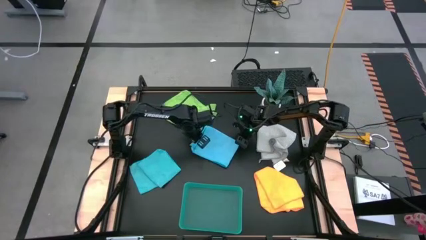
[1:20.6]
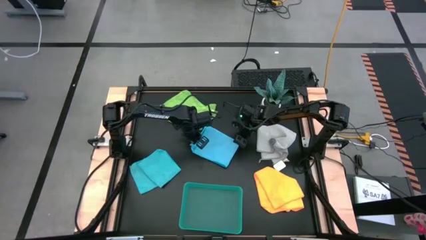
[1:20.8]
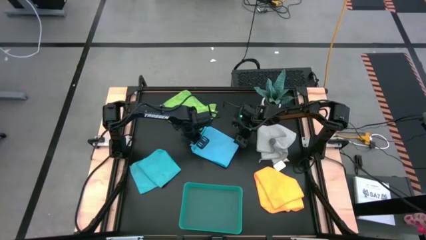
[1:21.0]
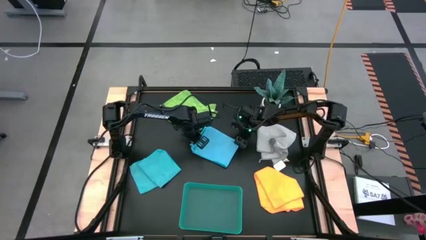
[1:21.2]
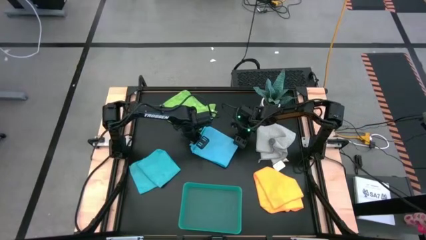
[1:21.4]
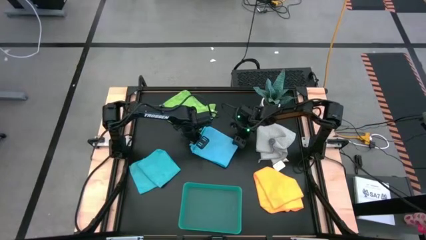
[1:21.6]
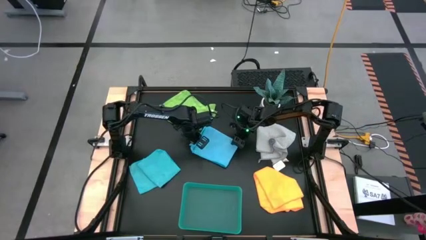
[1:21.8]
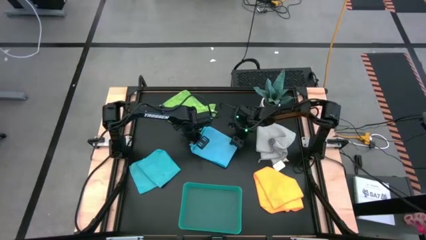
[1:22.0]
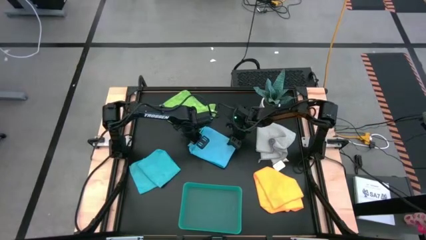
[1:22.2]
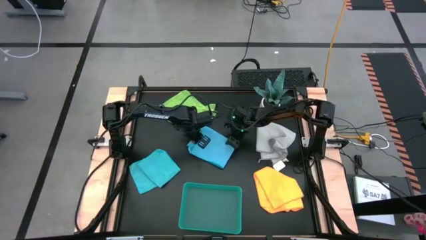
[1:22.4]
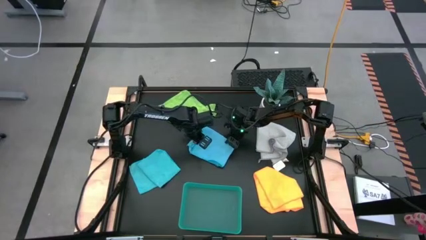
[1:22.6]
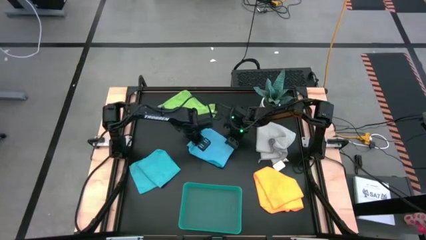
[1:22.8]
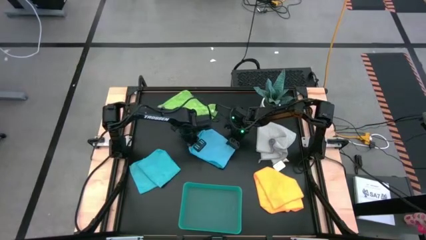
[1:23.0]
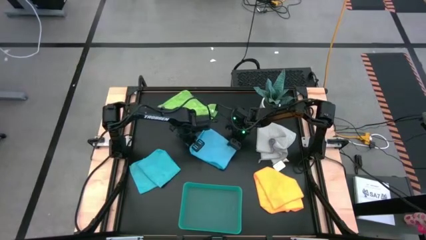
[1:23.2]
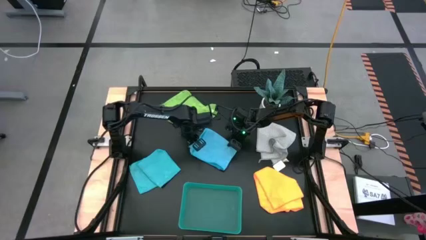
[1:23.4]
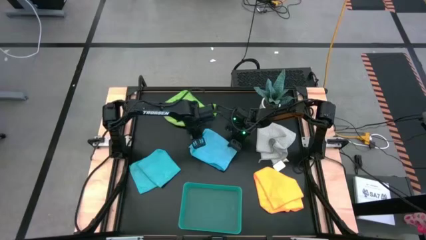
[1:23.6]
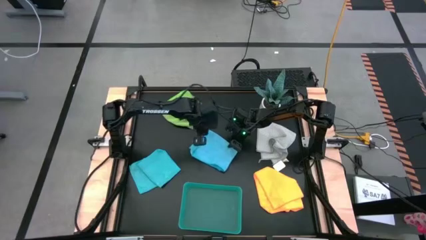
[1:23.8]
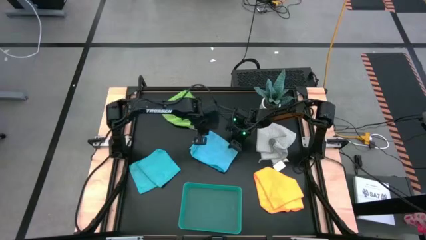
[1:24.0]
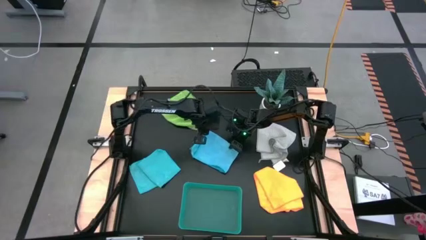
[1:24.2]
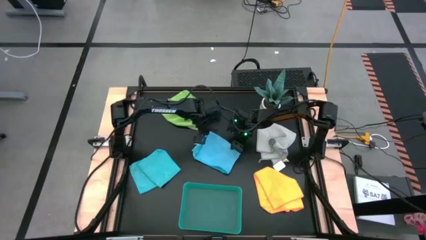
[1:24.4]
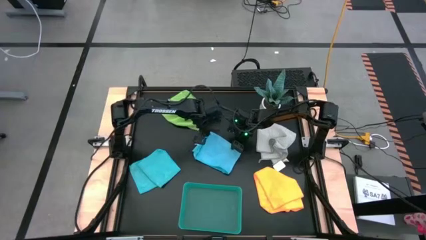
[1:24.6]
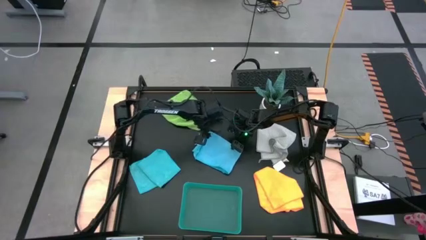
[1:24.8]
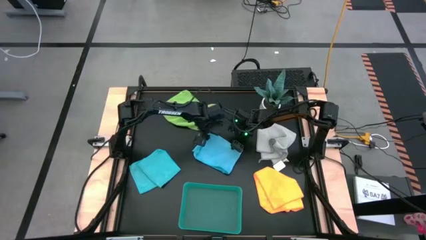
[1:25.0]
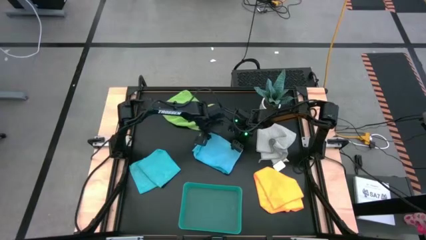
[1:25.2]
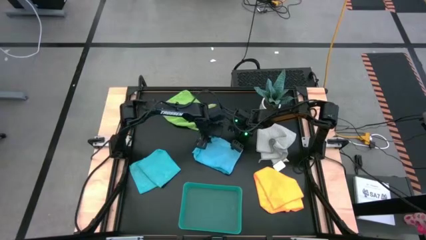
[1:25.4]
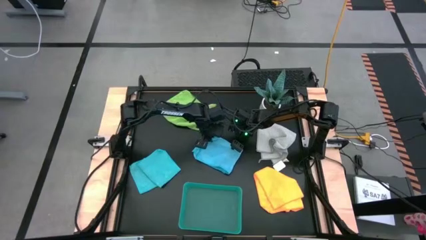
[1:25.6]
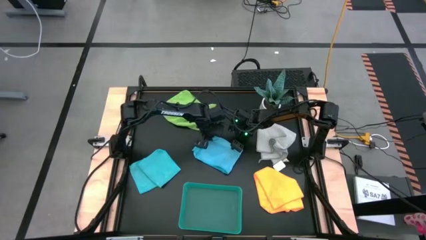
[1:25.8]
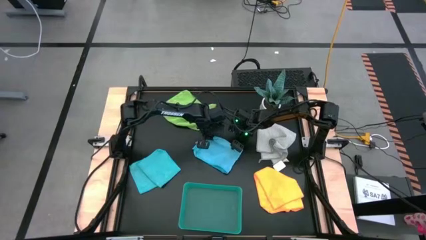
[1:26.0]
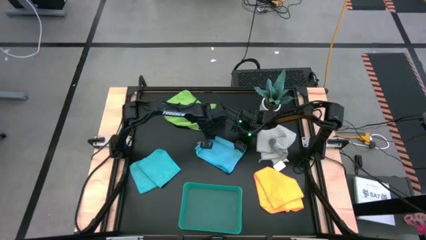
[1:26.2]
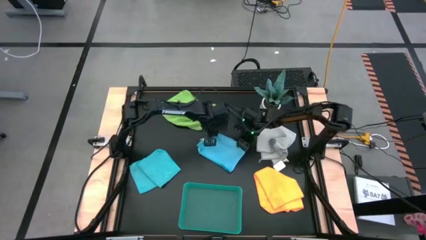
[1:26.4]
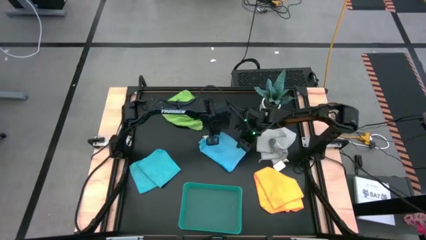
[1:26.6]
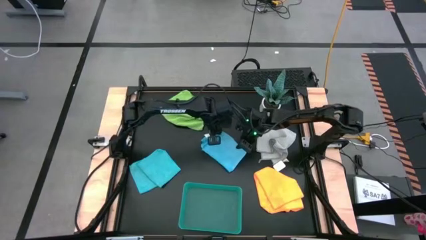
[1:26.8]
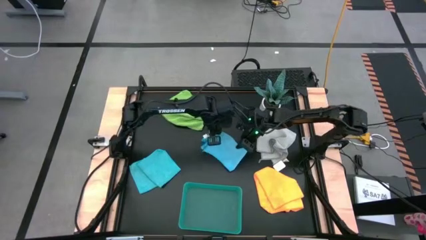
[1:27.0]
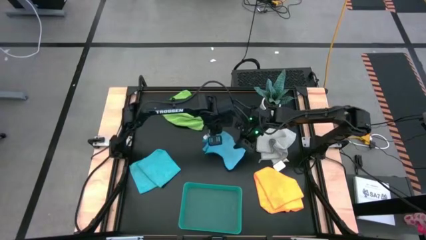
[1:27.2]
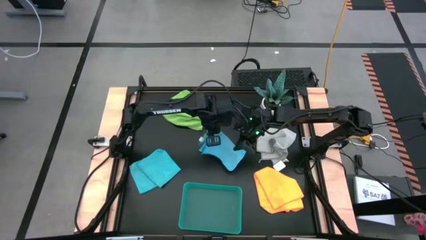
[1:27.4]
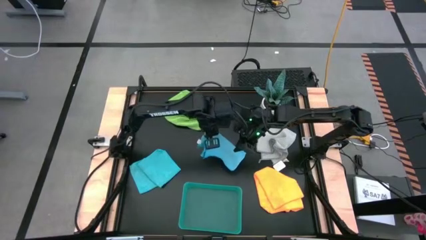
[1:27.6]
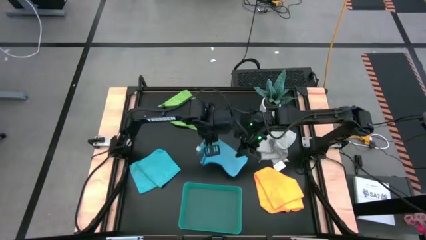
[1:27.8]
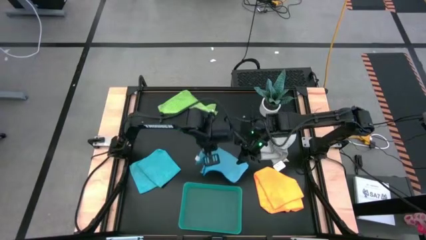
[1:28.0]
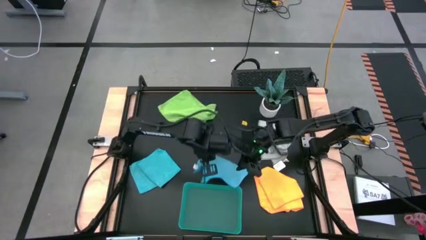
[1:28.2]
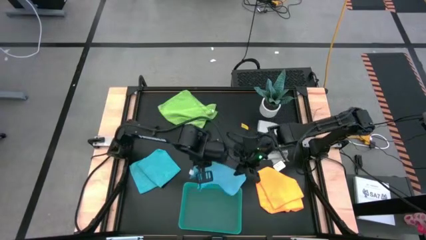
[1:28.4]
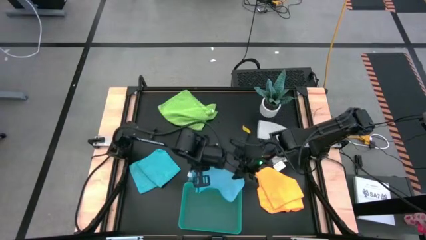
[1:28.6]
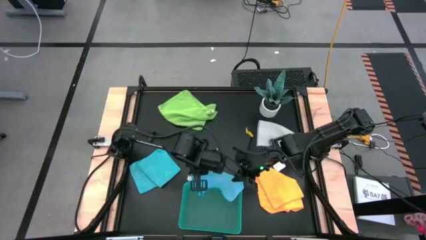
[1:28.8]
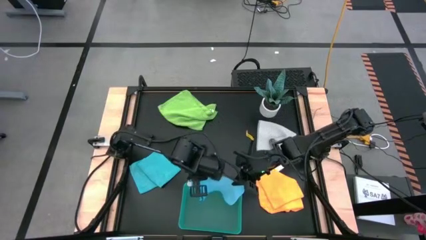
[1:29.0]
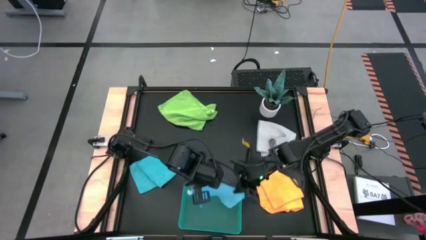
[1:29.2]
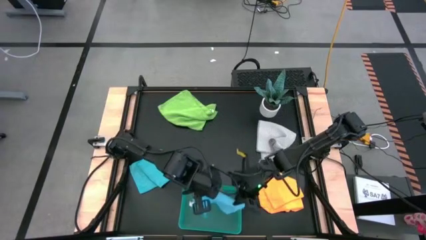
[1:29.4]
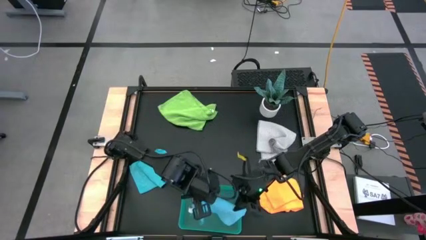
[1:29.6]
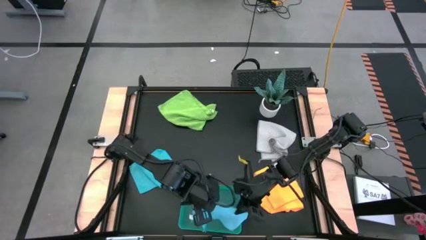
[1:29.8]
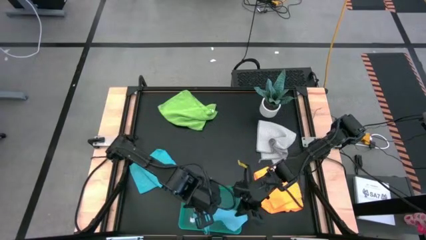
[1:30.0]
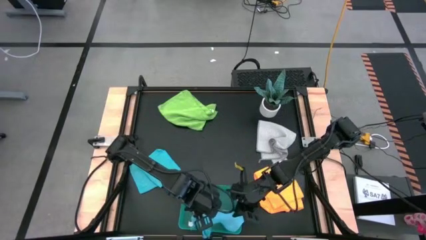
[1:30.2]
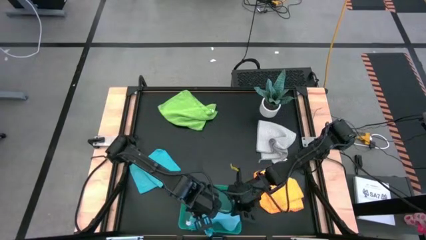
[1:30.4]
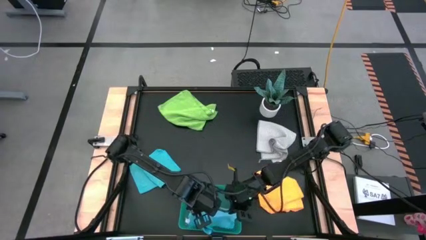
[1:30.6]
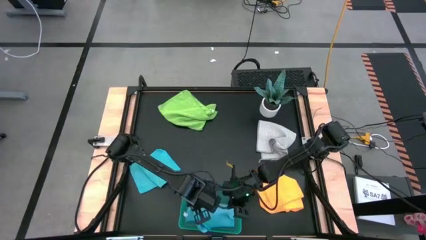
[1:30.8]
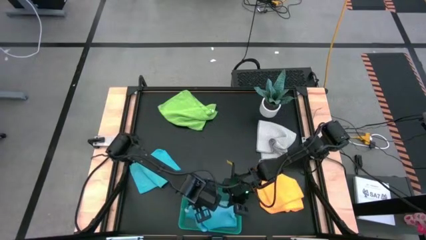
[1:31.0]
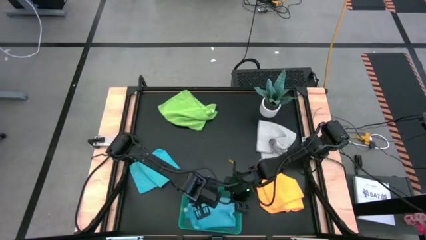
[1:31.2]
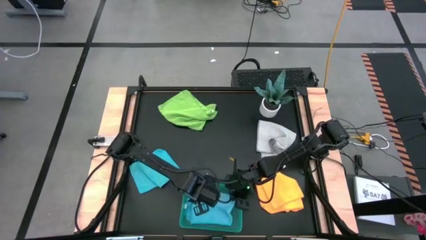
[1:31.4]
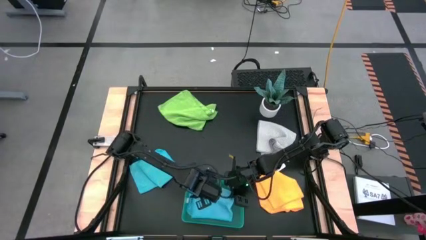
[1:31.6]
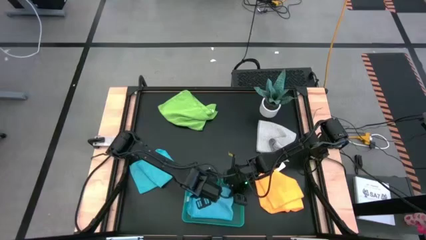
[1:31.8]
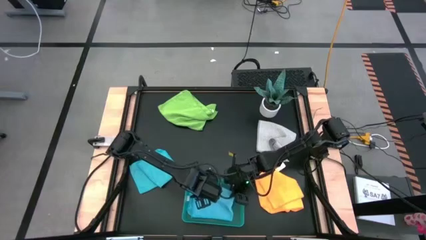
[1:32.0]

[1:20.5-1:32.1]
Task: Fold microfiber towels
Put the folded microfiber cloth into the green transparent bin
